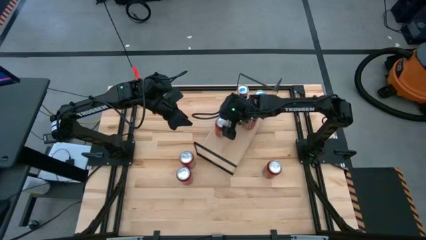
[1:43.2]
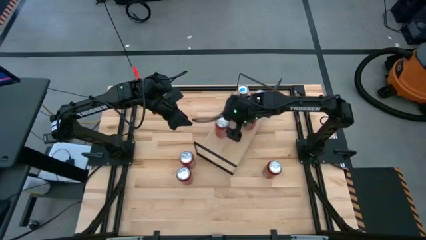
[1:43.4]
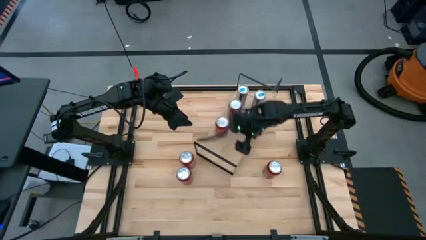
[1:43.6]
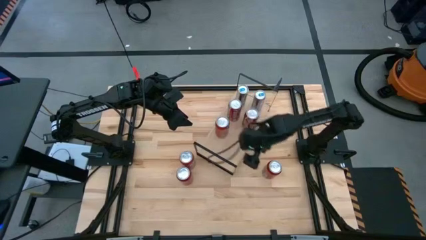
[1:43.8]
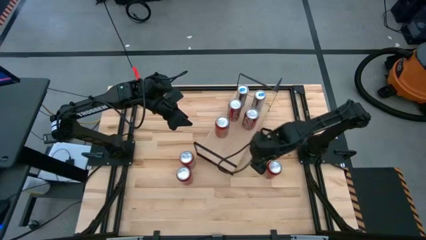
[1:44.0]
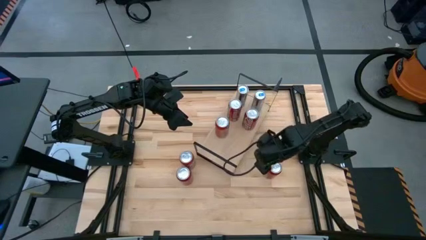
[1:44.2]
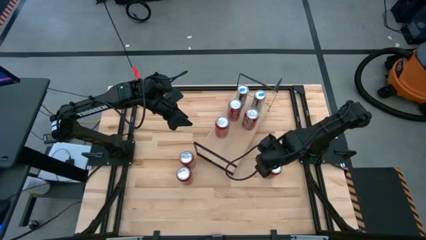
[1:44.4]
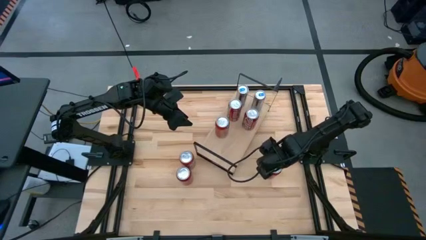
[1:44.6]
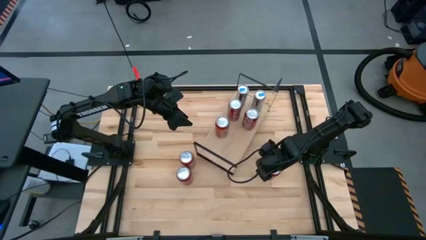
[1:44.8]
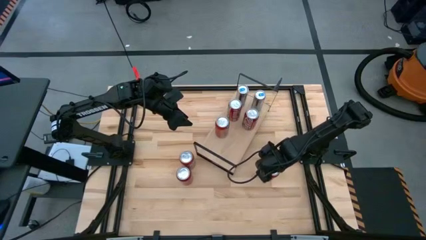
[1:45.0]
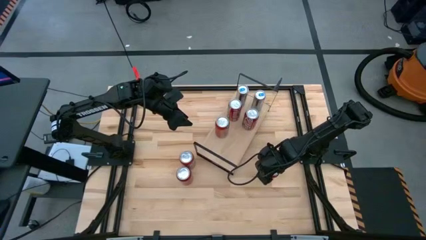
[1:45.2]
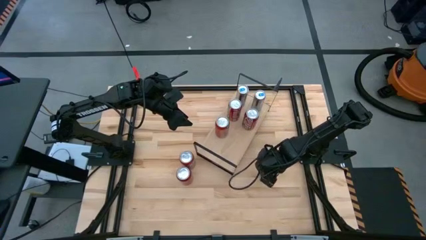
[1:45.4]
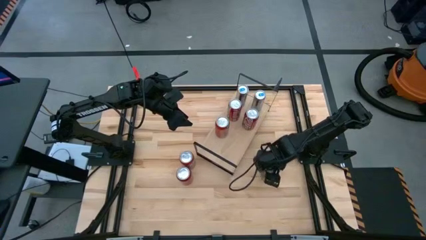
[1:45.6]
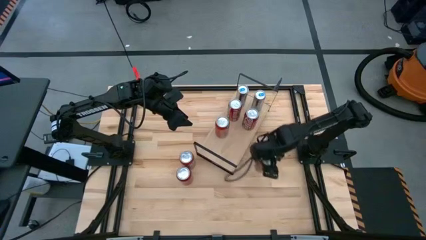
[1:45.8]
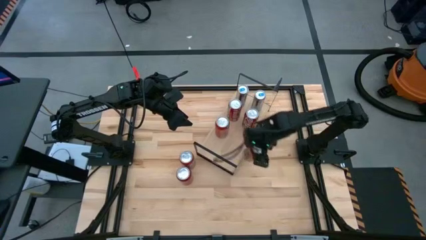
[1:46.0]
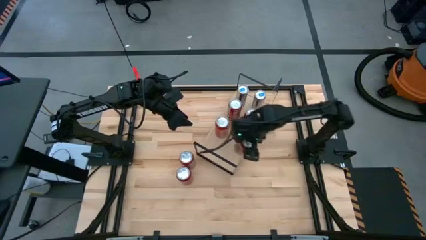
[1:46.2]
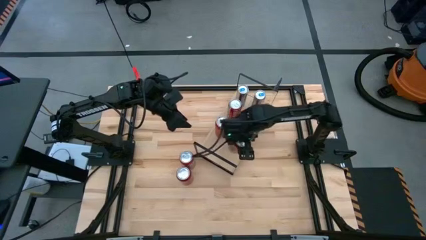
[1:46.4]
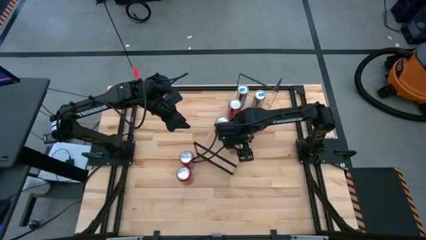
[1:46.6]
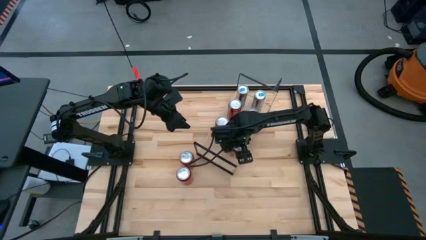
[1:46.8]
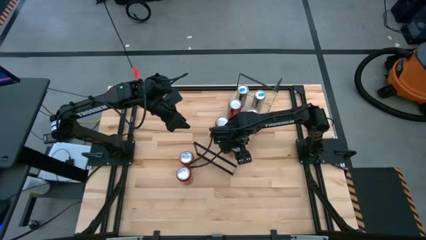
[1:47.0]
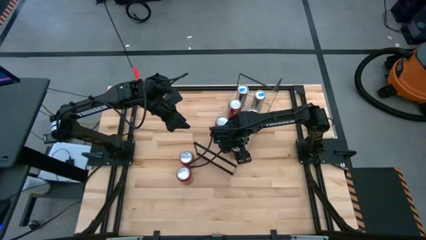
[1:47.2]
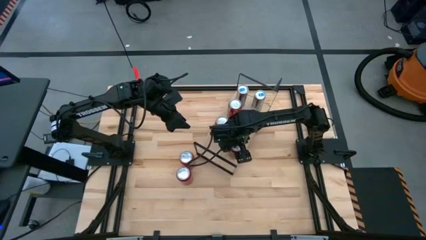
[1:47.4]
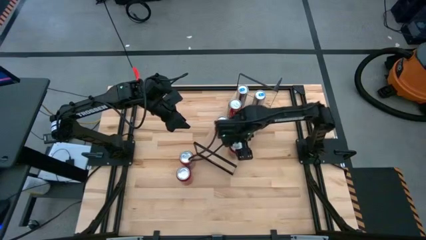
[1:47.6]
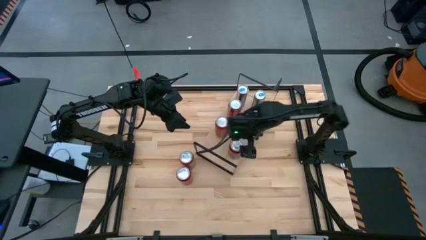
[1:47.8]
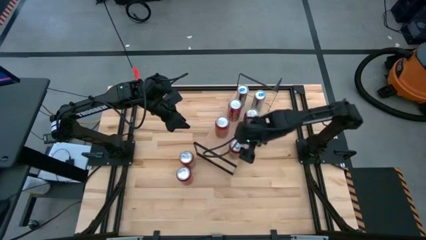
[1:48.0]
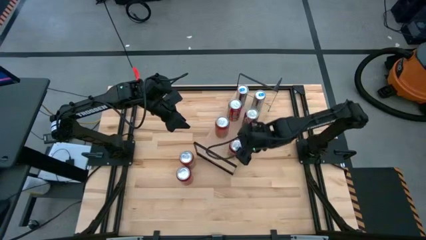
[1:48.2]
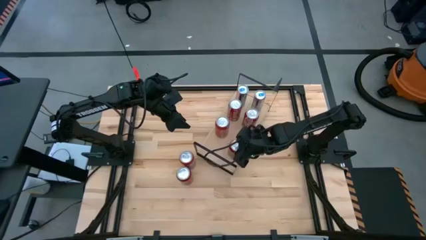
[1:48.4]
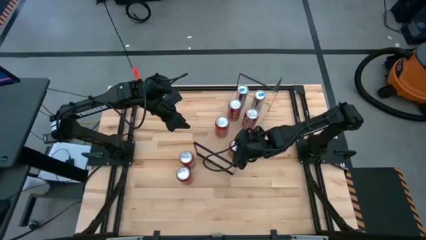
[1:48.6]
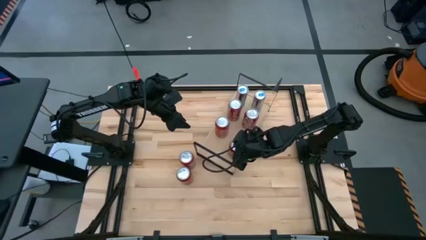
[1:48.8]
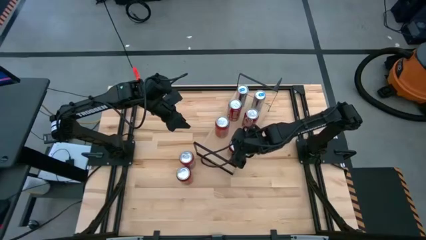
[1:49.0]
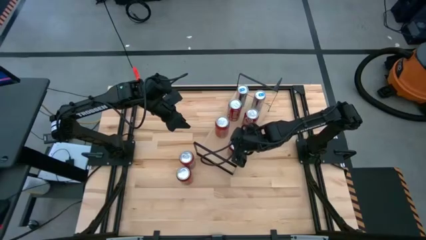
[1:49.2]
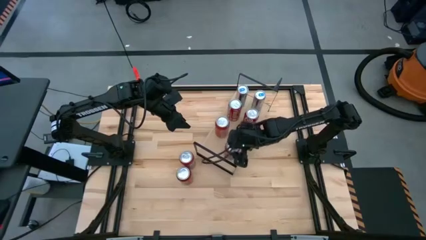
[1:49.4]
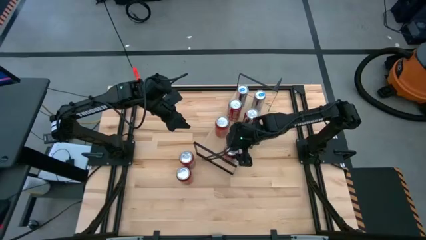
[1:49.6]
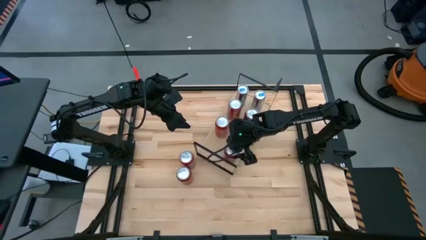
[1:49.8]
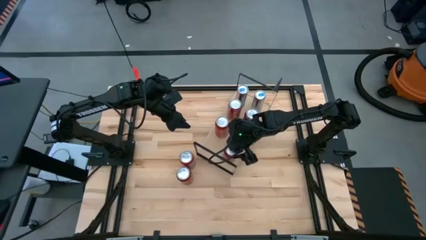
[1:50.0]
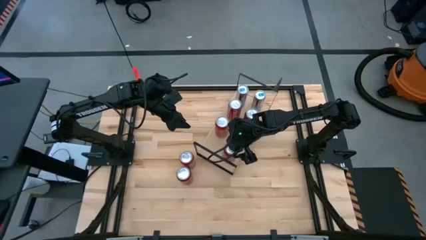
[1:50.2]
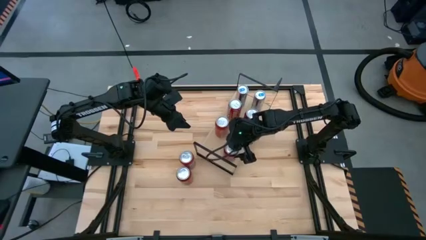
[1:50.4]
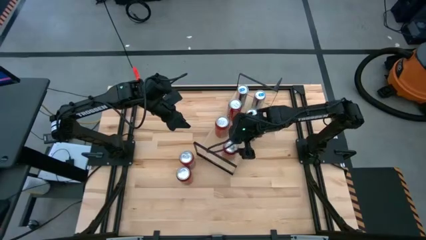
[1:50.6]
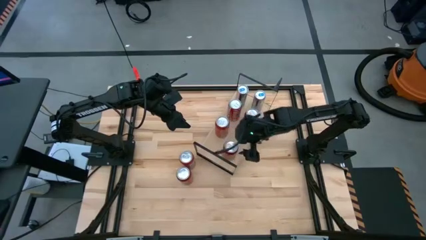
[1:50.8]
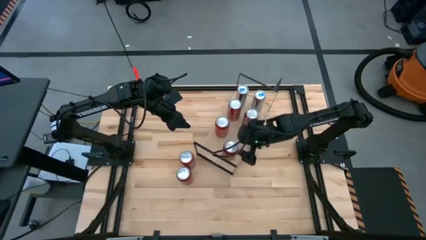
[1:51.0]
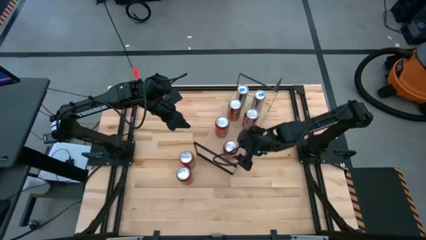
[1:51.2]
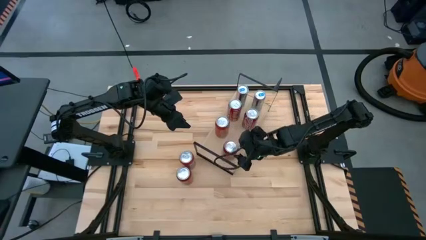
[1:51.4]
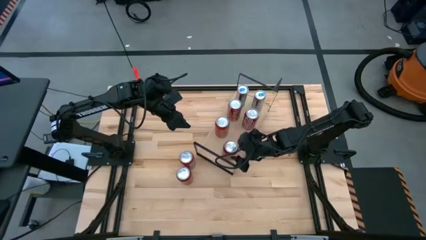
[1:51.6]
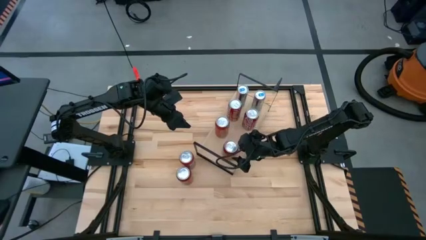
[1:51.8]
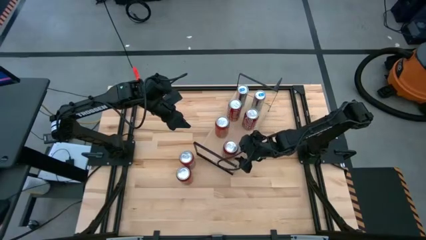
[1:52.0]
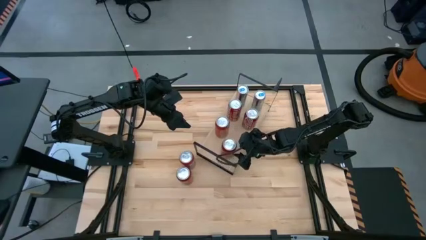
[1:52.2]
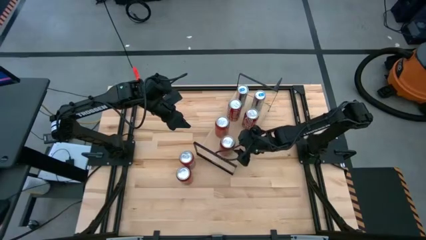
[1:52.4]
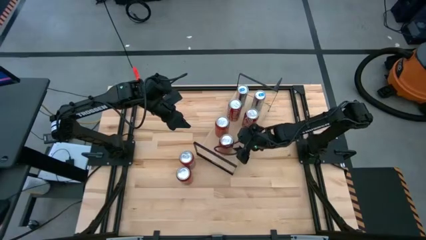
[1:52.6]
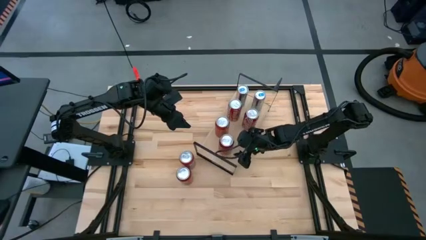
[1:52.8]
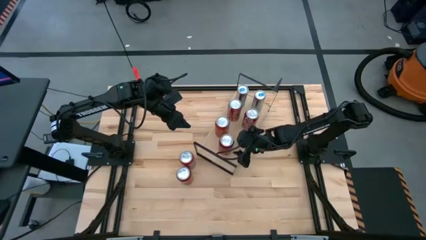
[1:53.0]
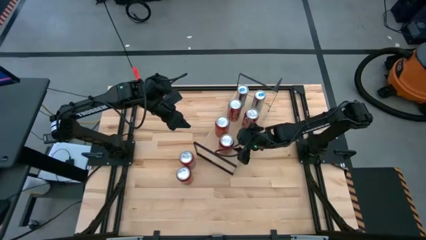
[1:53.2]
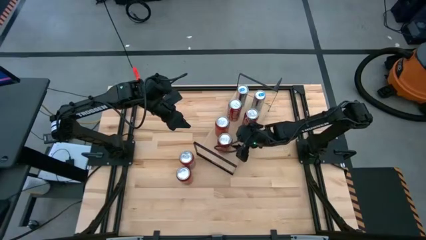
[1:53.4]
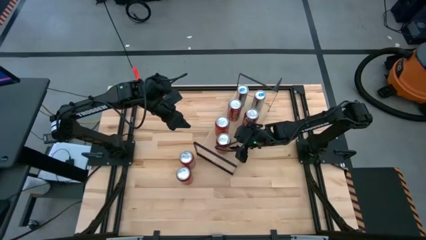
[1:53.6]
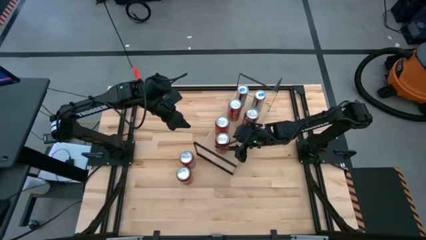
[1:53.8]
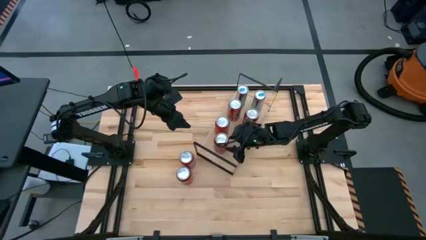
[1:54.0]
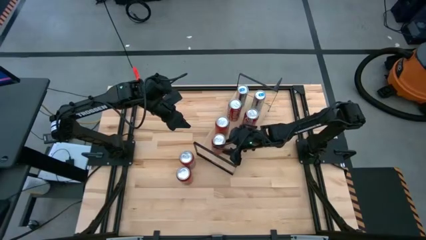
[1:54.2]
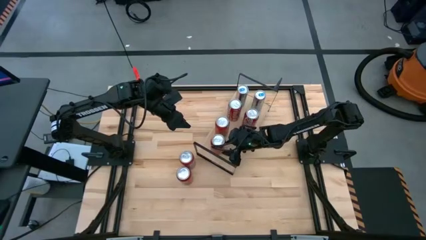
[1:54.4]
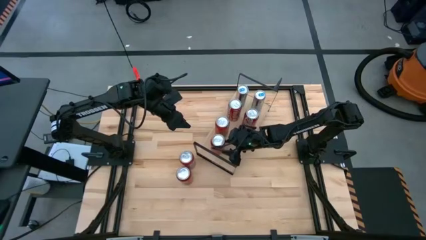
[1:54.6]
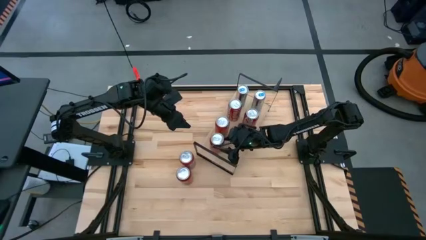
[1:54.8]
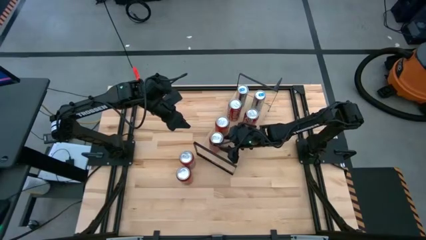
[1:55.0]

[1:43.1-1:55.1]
Task: Place canned beverage on shelf
Put the right red and black soda can on the shelf

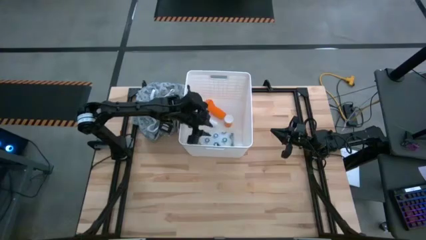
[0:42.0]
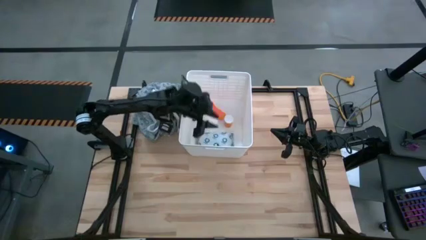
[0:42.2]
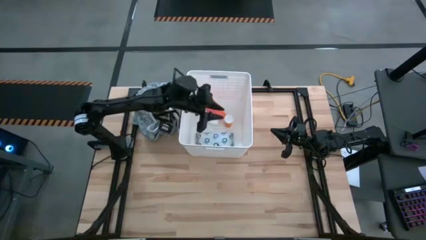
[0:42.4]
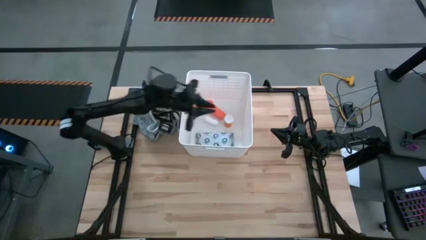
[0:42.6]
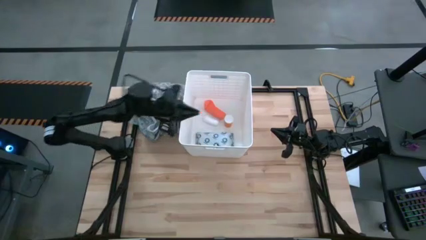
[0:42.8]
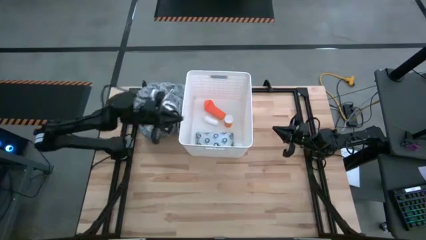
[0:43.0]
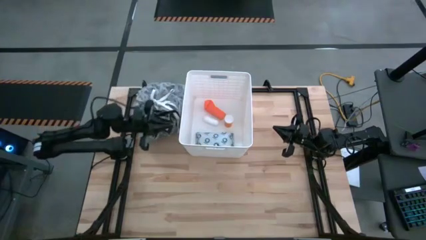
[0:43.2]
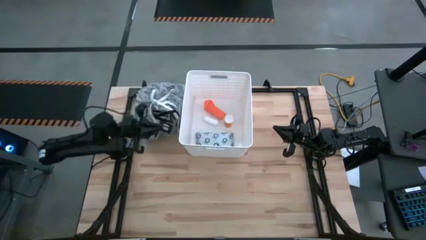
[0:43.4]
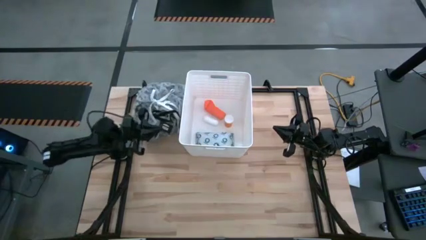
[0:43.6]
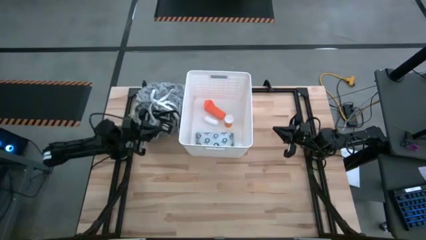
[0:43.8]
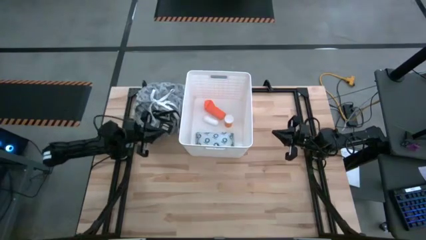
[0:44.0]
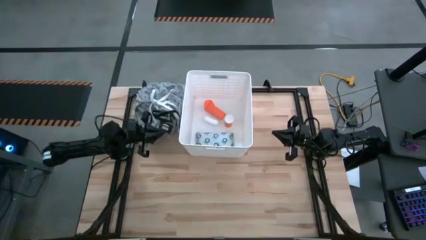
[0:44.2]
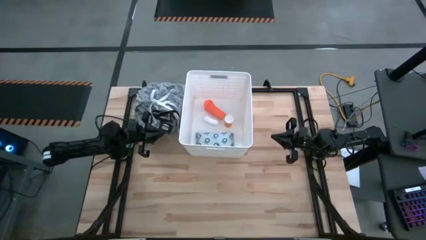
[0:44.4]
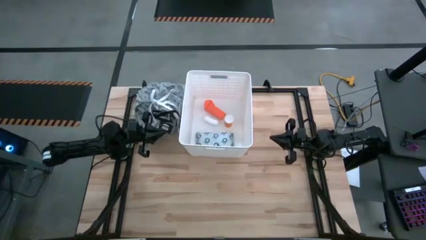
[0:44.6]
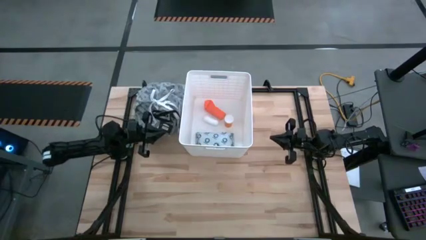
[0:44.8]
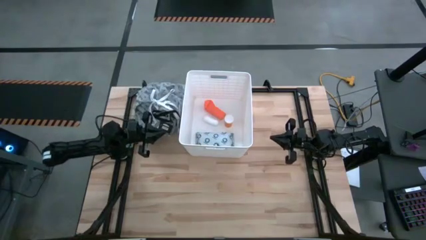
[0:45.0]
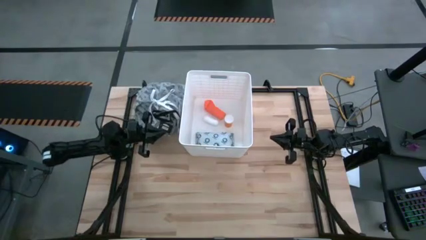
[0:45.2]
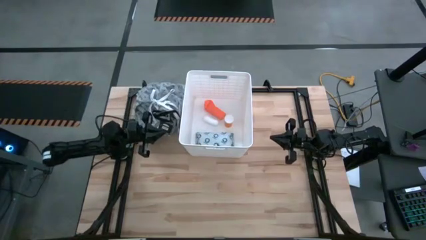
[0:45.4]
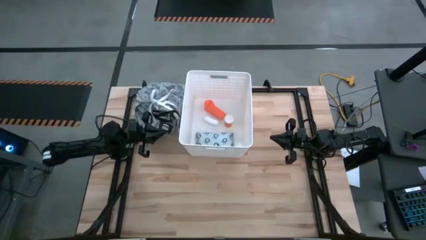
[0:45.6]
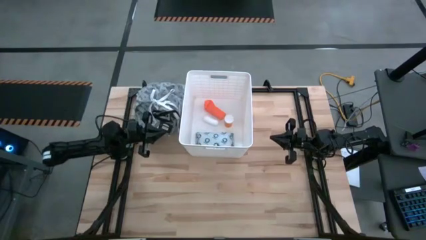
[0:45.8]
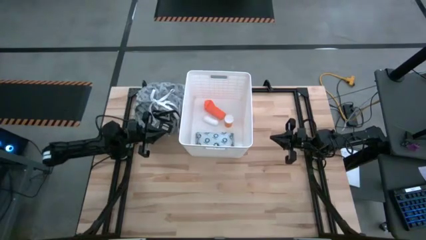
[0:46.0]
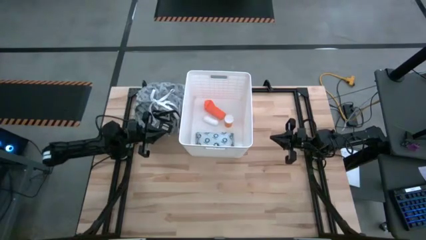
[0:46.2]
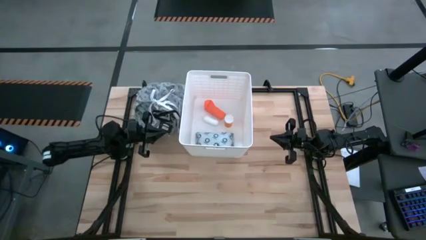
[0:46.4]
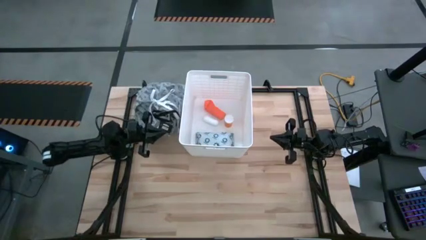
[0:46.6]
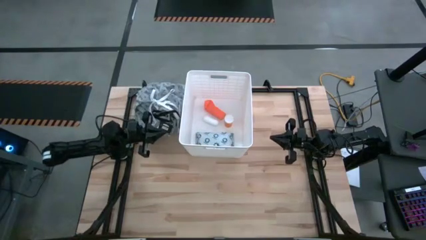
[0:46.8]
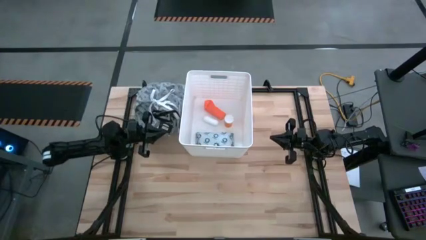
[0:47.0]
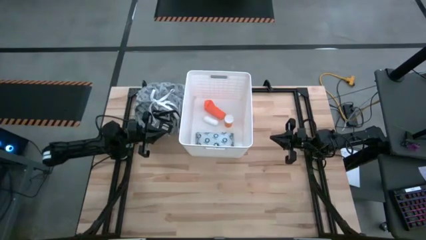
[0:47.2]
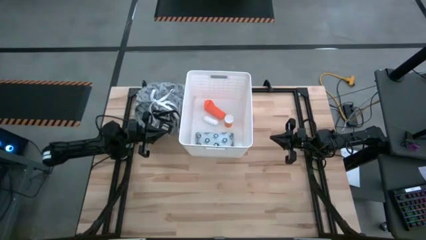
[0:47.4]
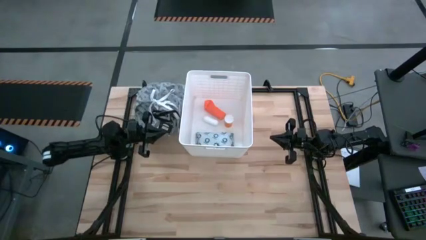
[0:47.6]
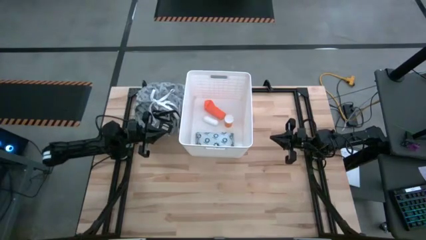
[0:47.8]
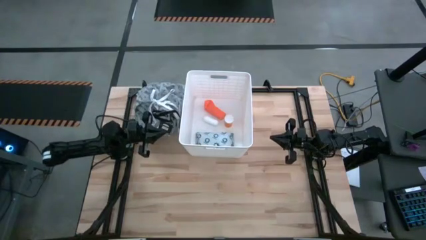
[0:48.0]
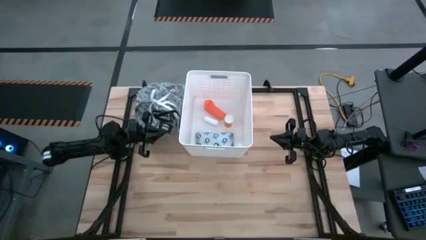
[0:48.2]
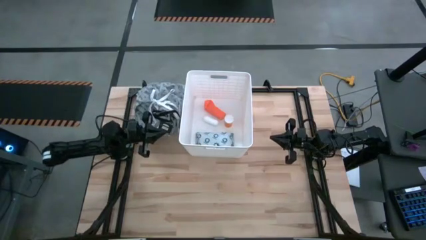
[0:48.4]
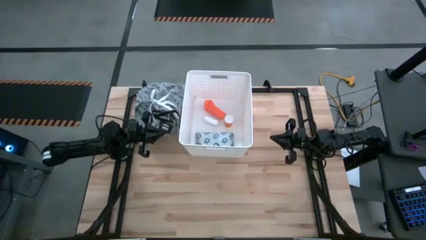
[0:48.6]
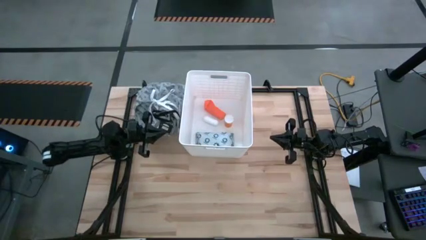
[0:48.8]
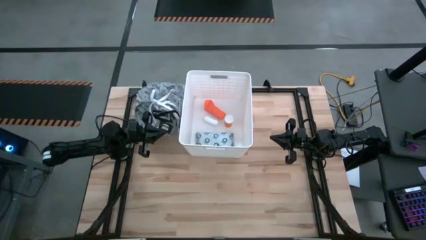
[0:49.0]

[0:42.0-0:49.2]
Task: Pick & place medical supplies in basket/bin
Return to Home Position
